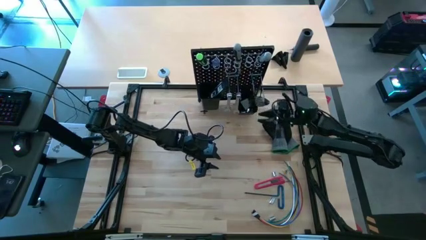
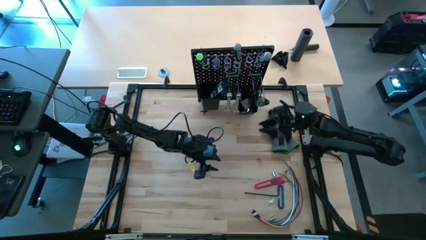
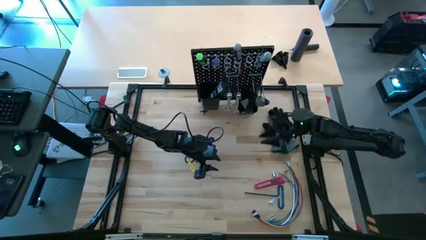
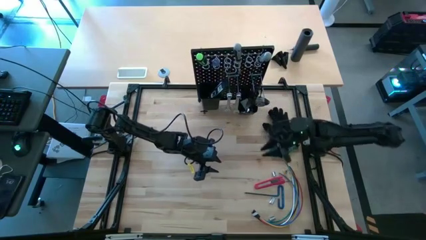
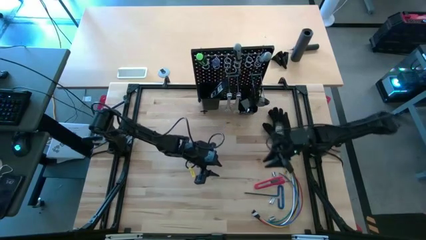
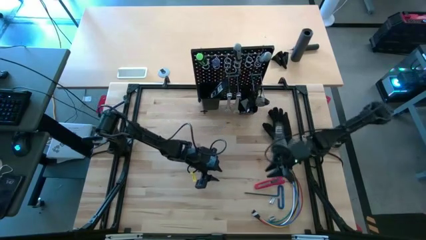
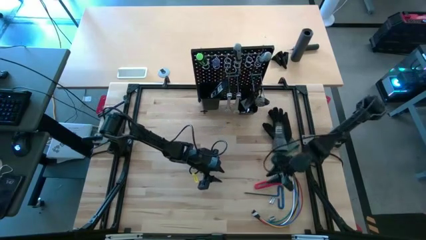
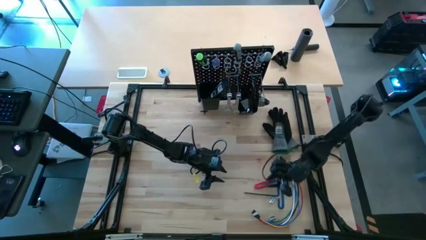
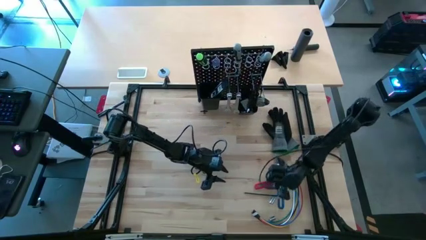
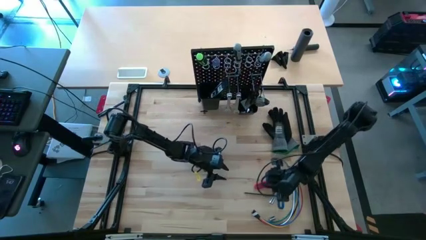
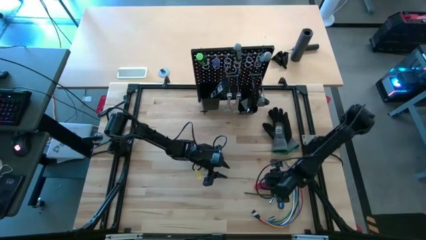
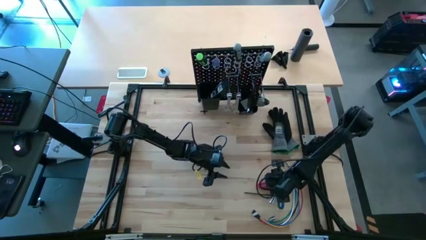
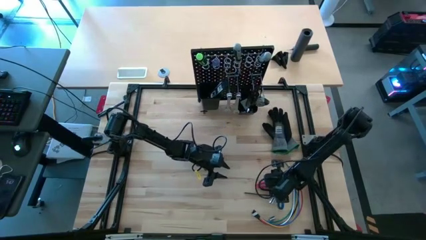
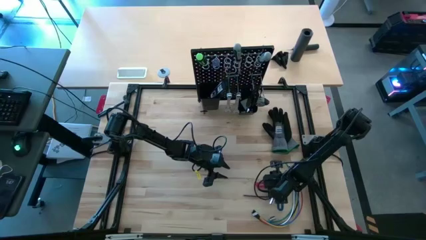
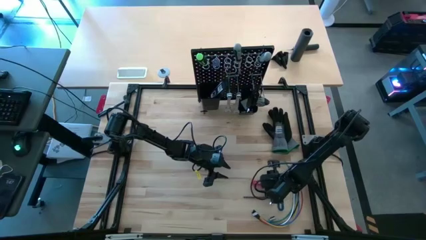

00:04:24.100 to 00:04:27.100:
Task: Hang tools onto peg board
Put the red cutter on the left black bin on the peg board

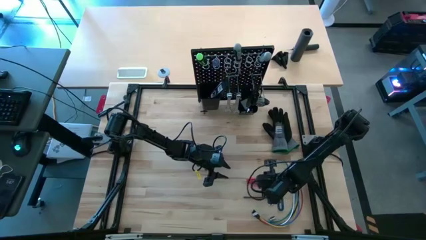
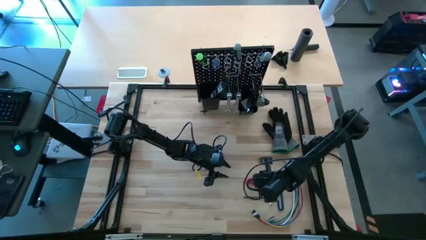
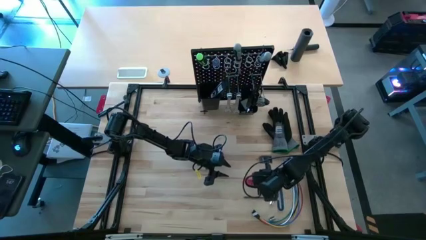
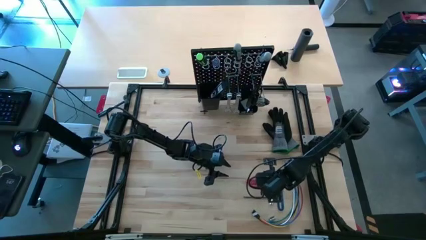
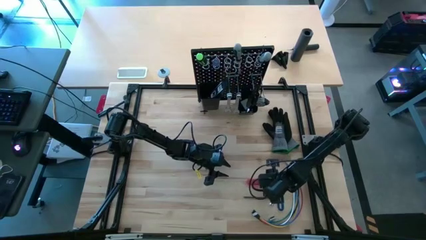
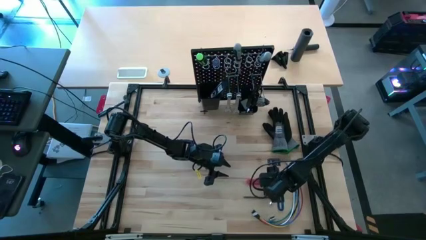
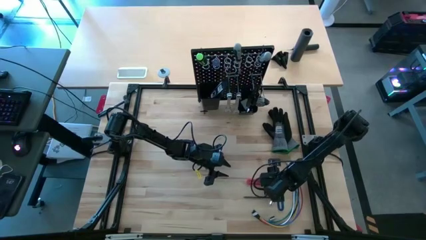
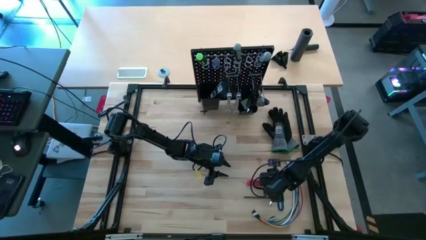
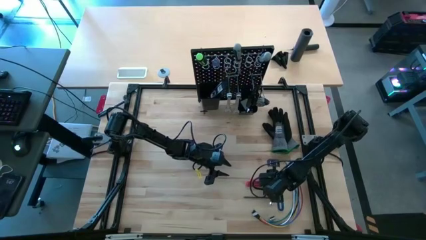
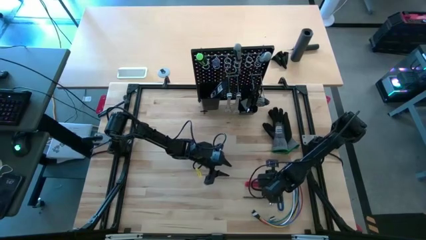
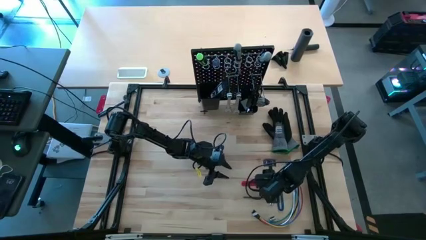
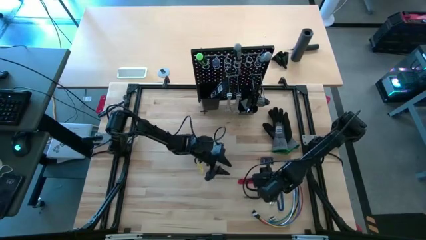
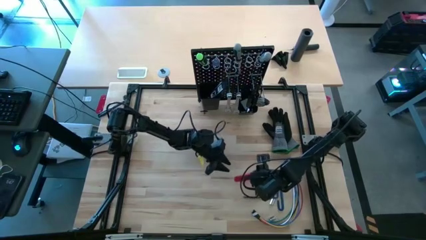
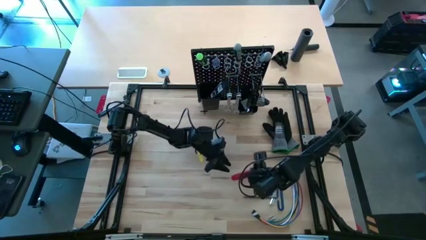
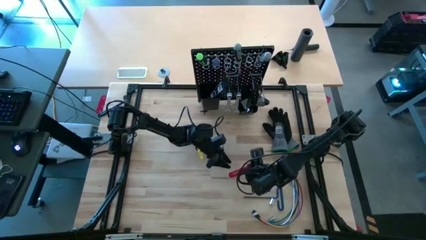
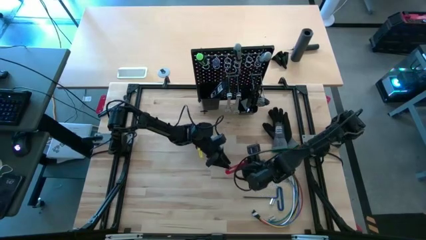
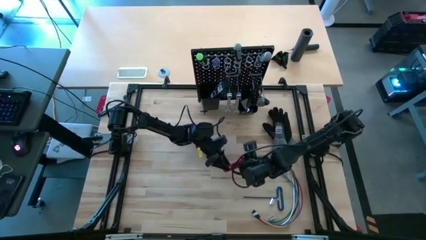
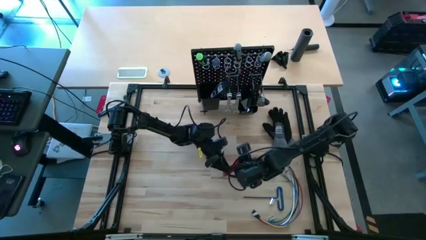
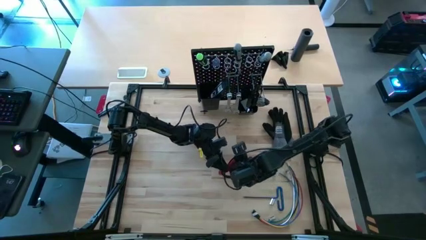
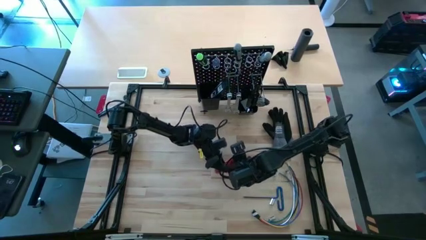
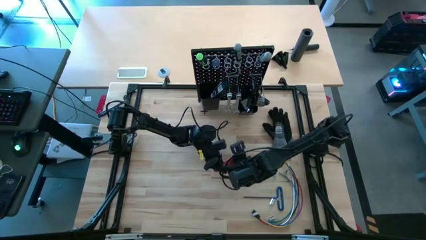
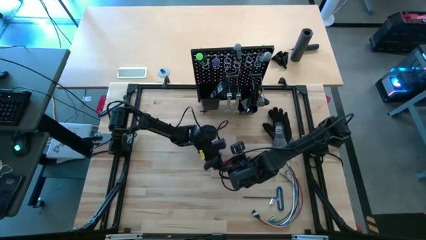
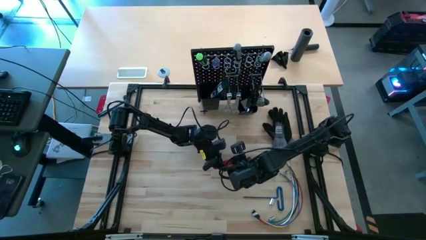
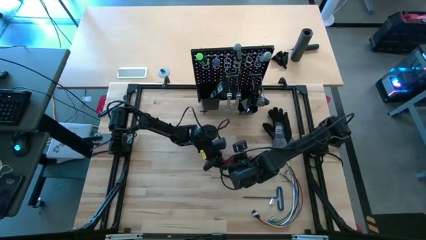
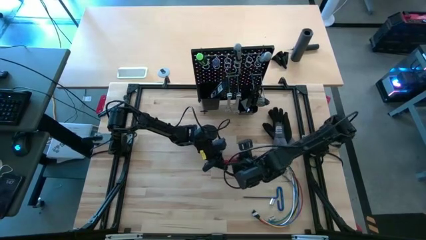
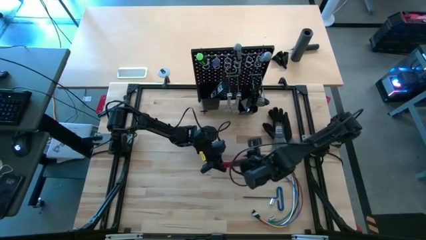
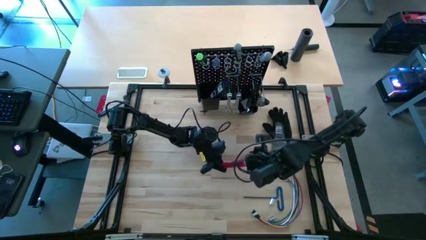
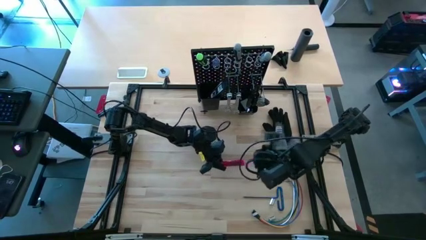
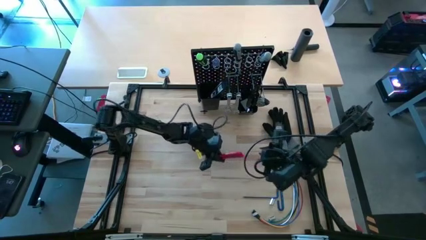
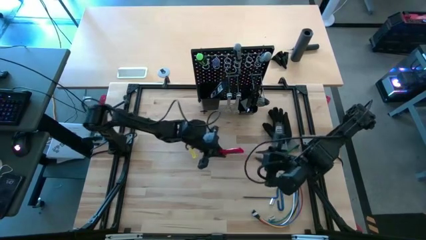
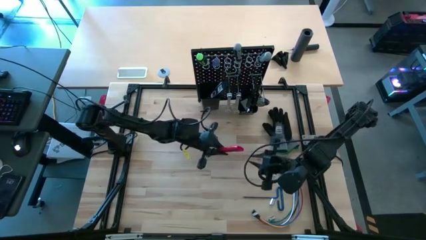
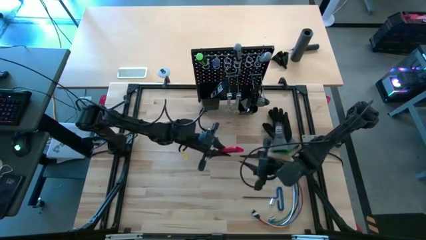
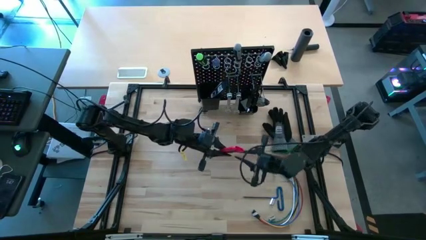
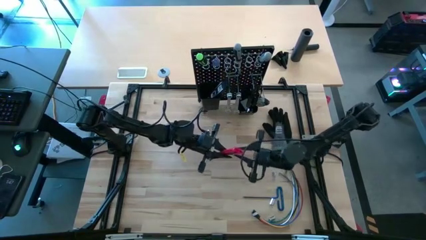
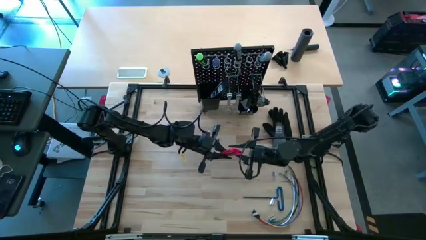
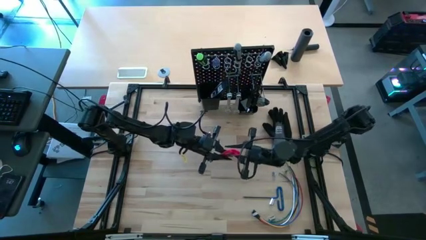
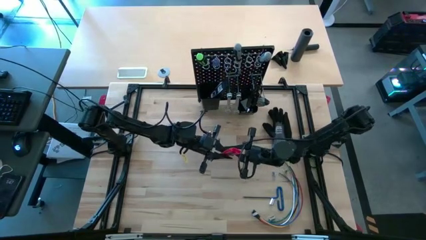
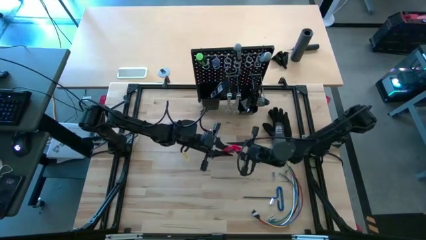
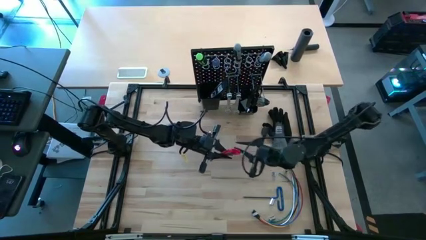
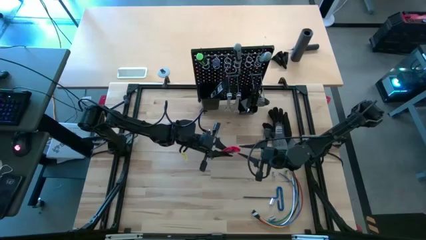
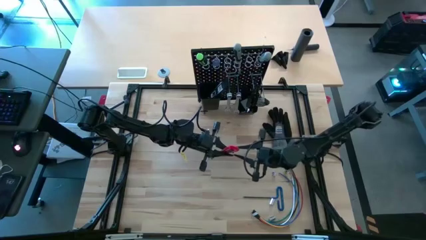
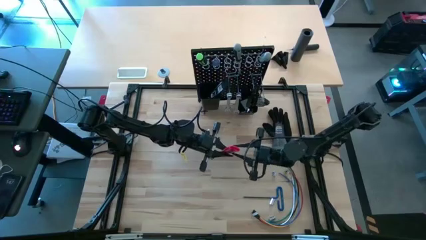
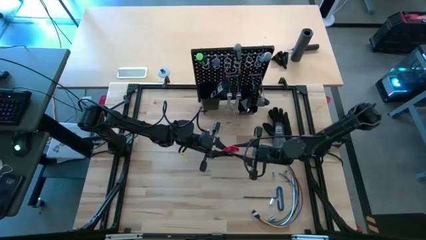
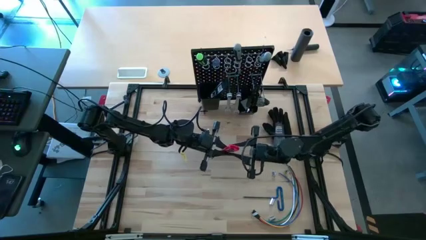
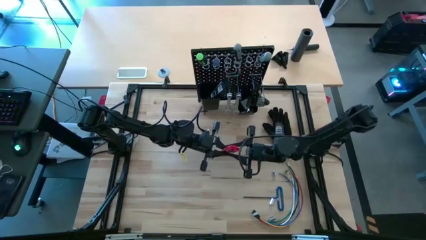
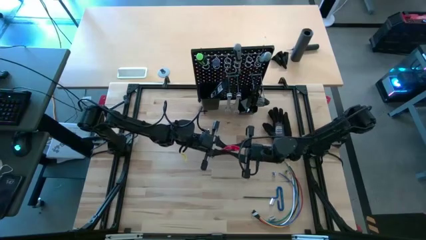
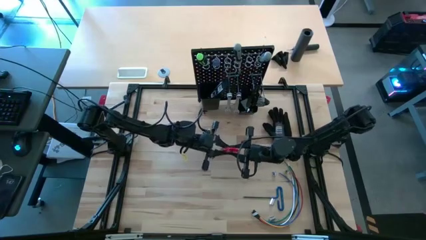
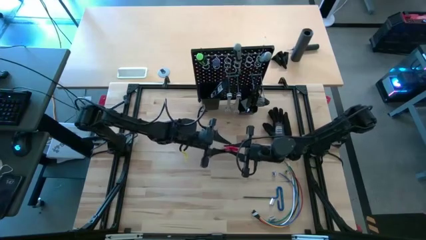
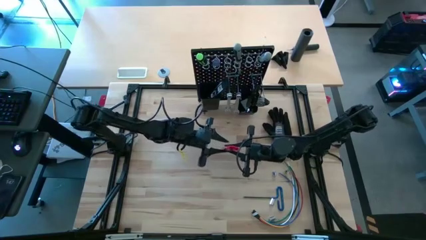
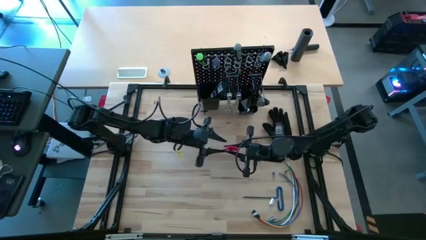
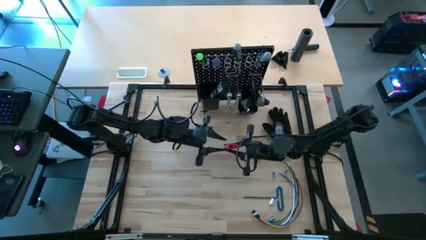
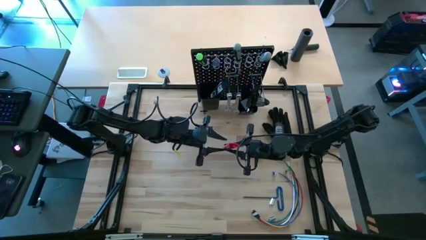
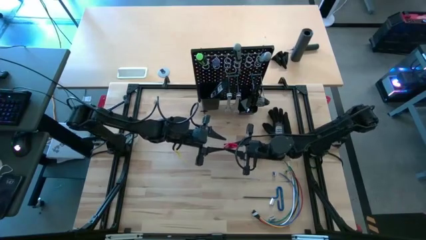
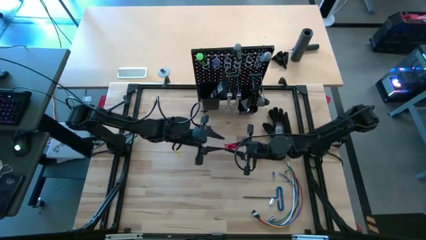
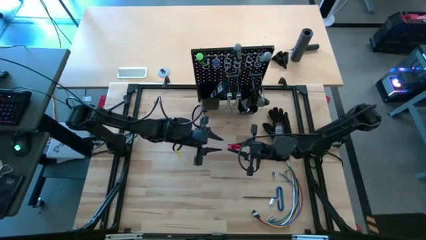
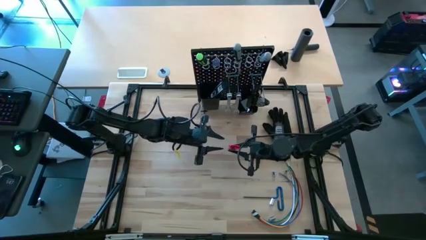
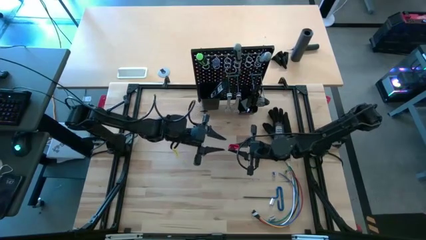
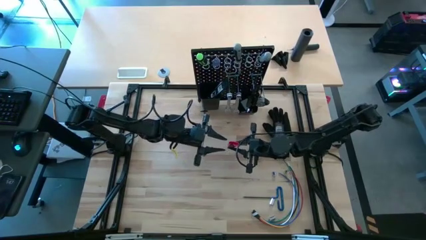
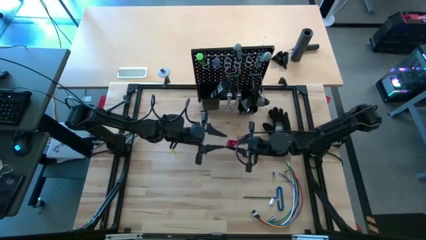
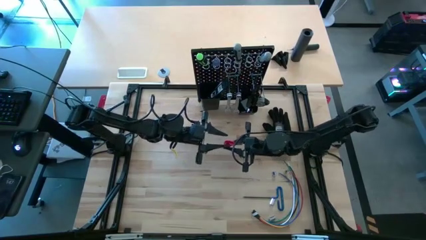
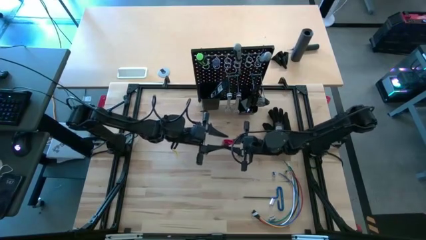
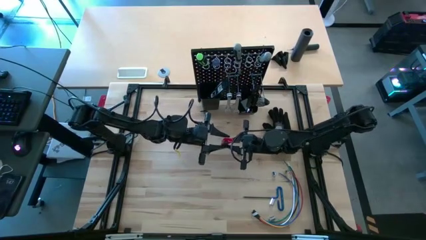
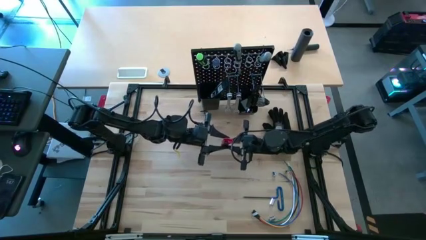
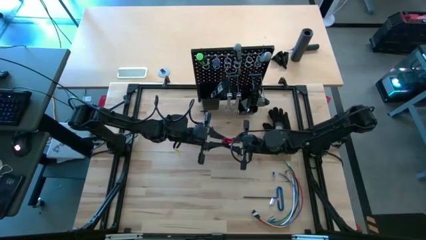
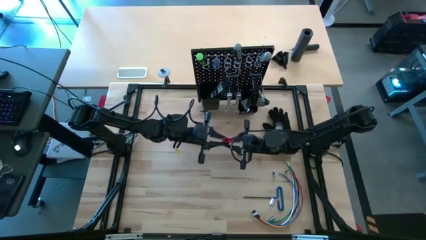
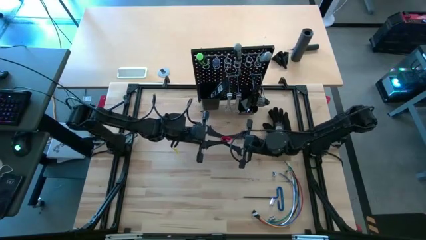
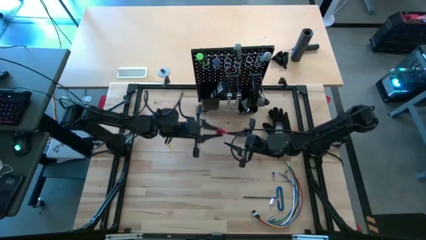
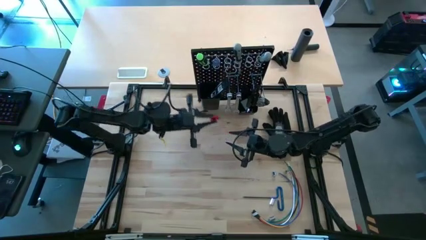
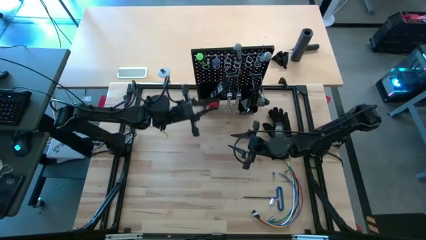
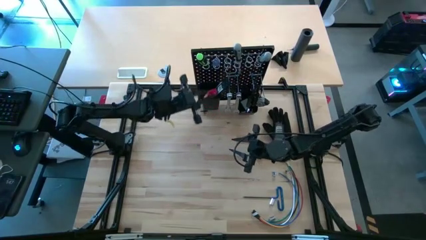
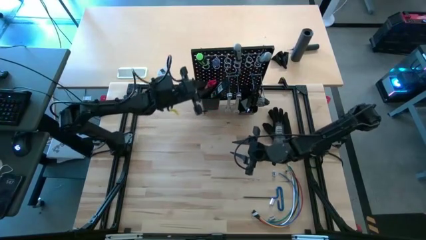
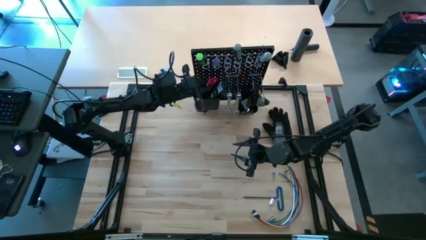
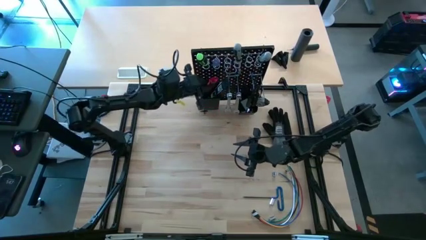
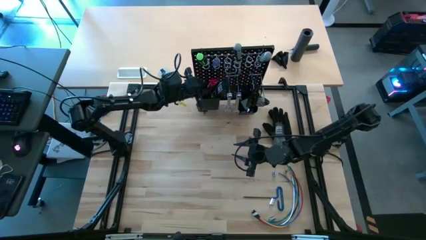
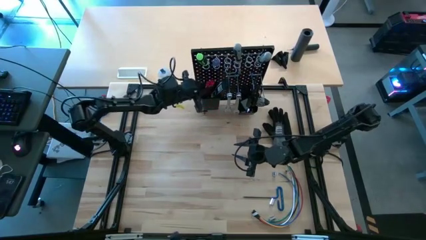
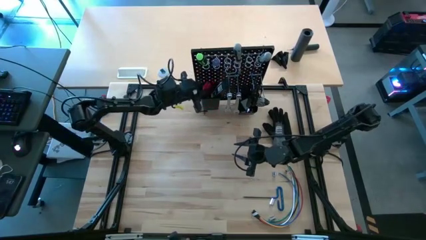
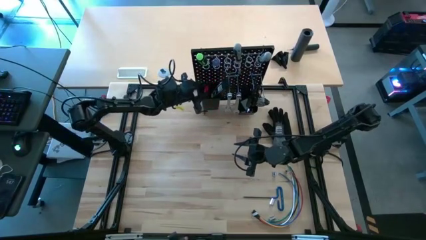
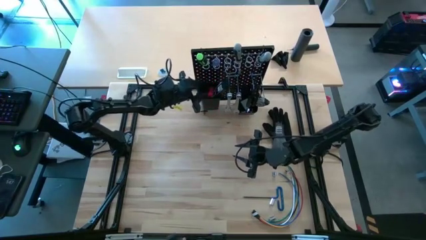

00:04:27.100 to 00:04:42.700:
Put the red cutter on the left black bin on the peg board
